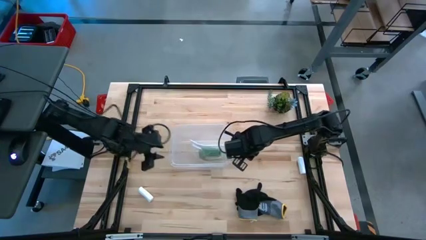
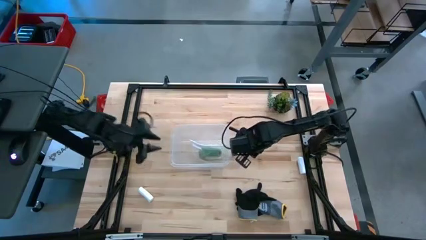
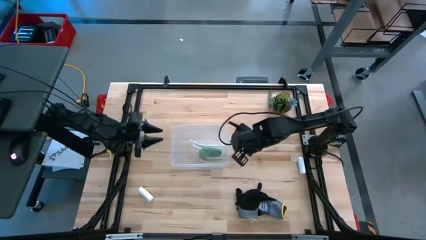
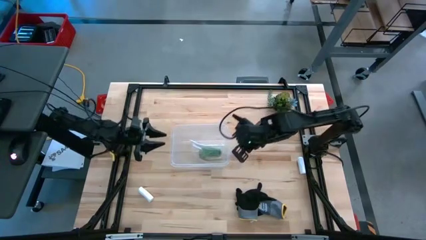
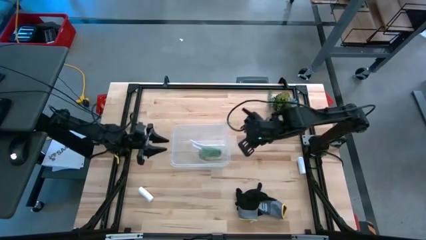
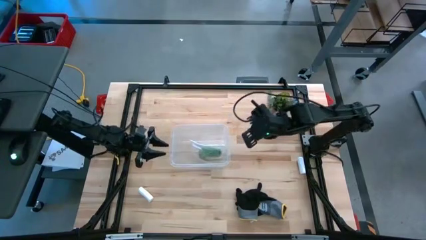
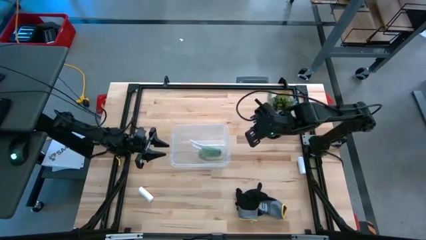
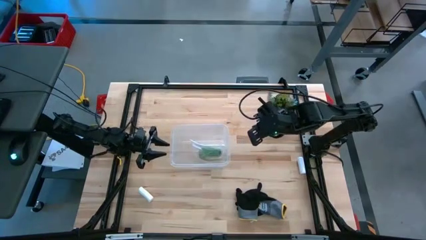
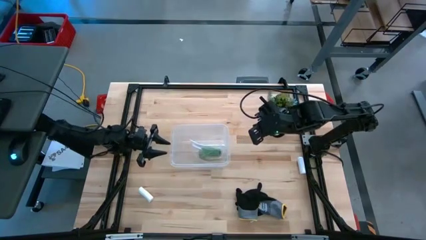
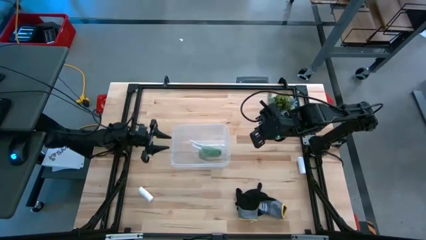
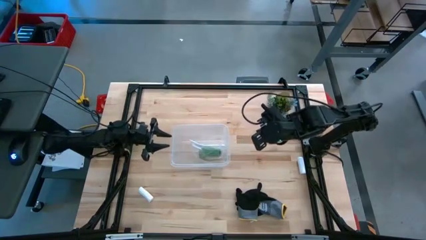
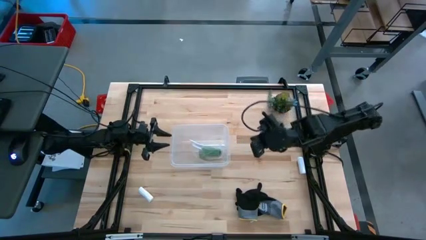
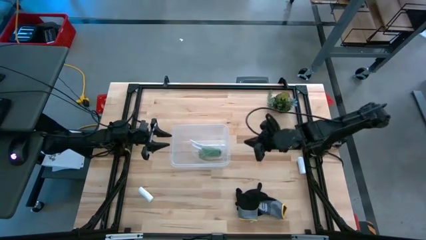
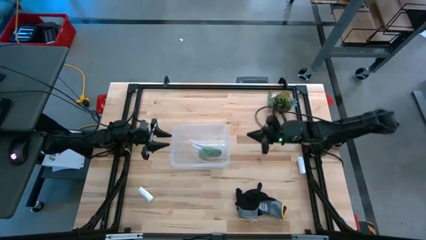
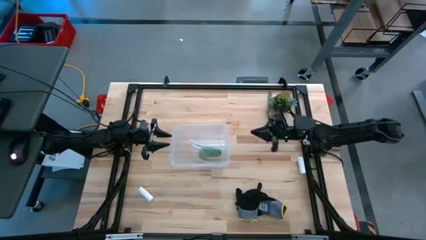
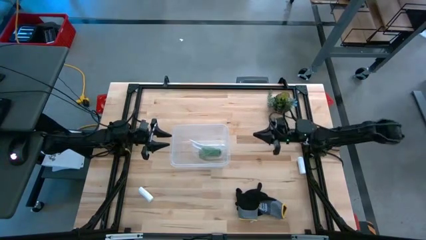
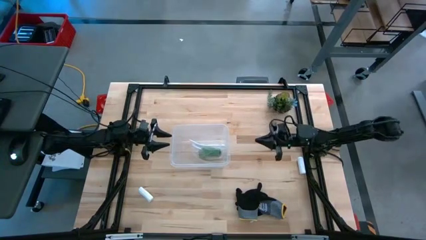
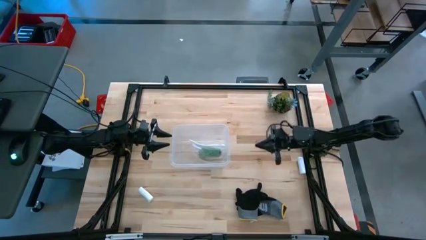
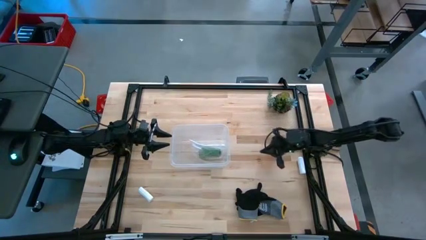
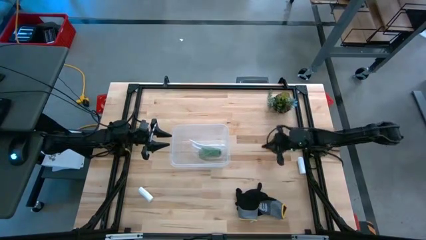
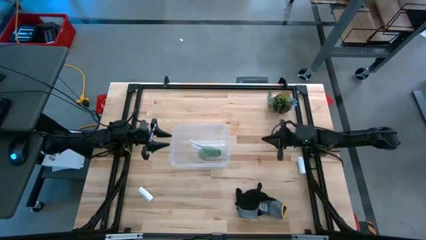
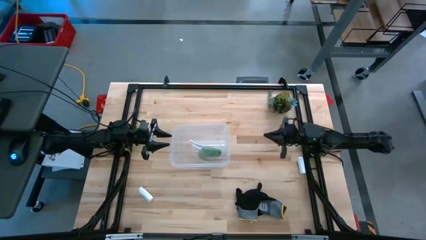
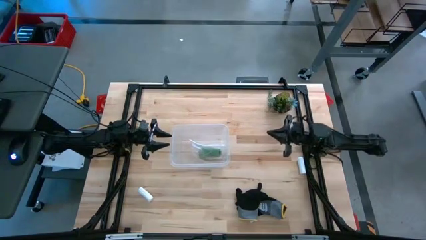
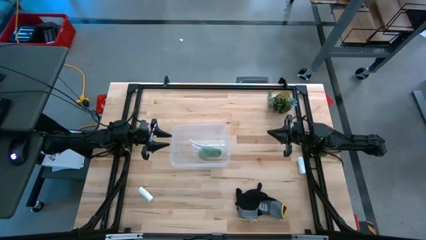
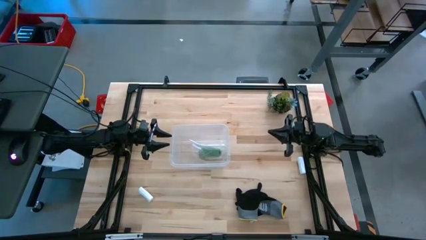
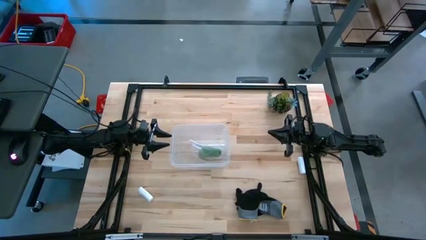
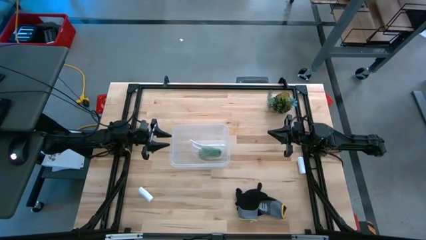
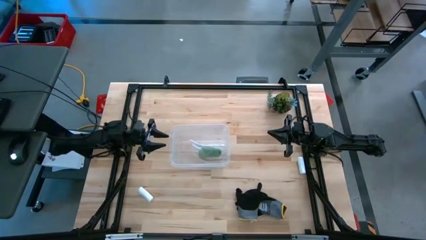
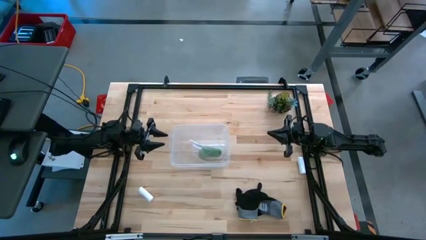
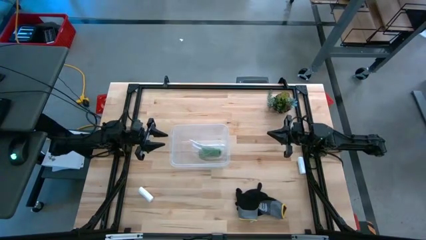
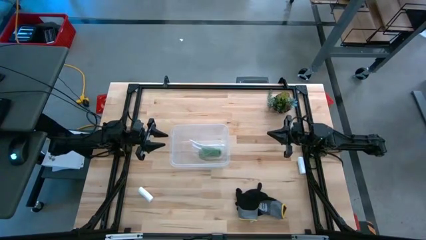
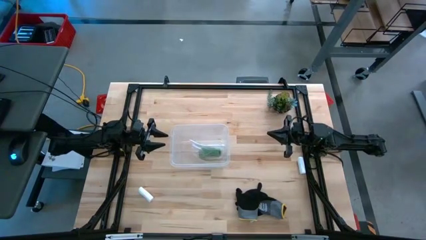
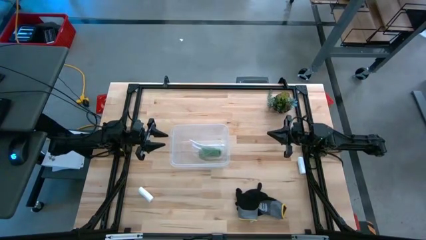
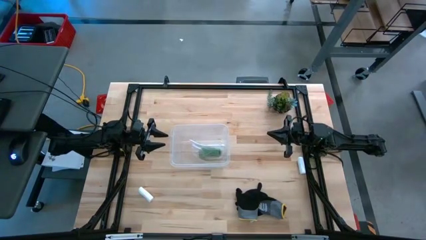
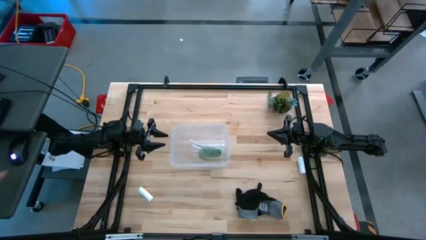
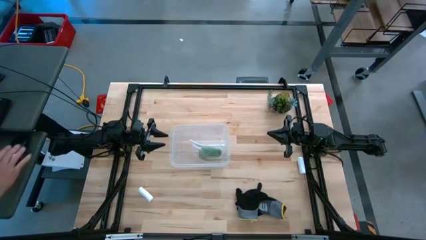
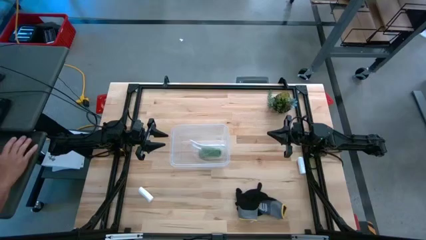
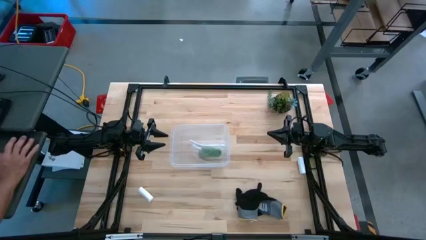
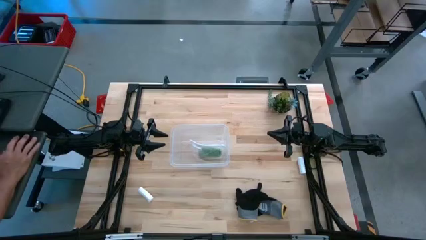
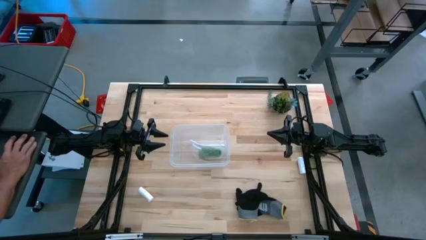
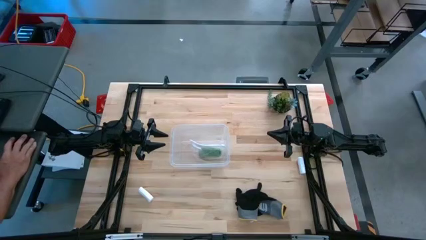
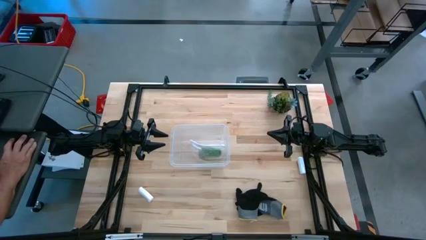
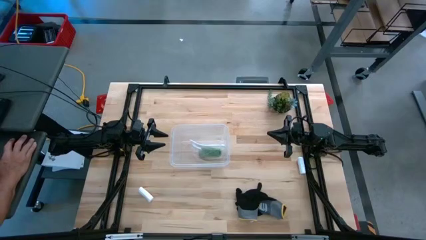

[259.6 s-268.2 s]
Task: Roll bandage
Return to Home Position

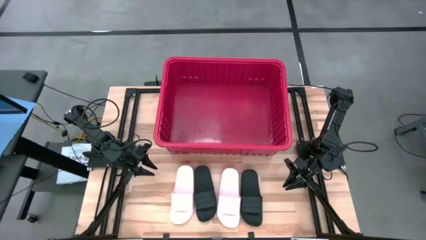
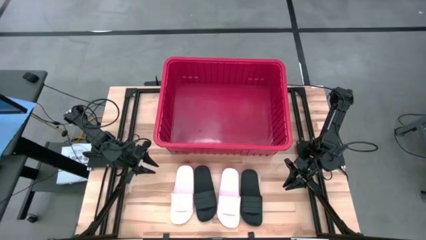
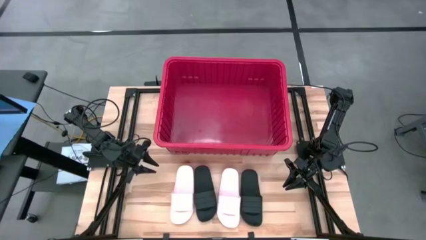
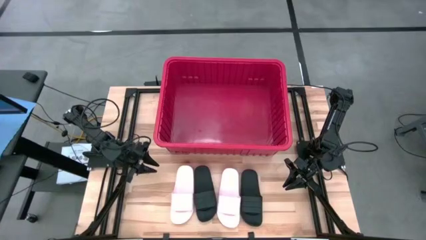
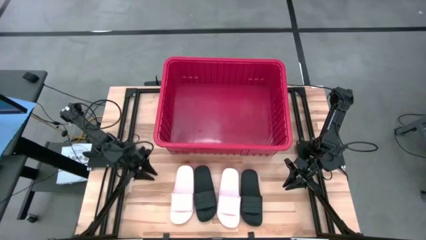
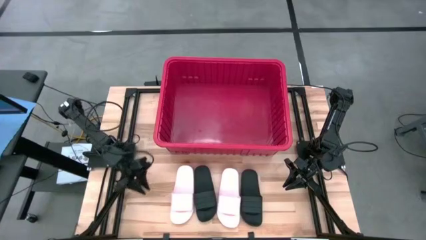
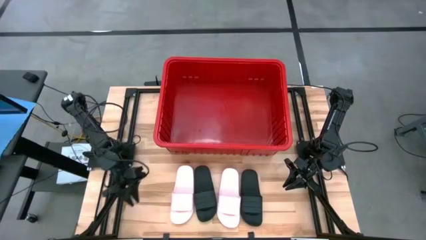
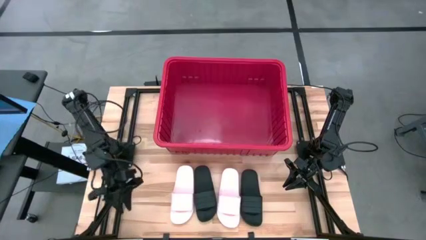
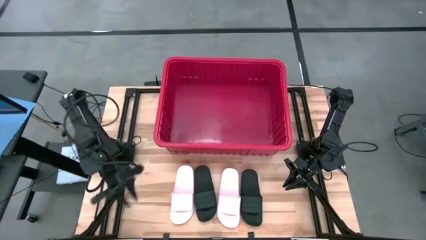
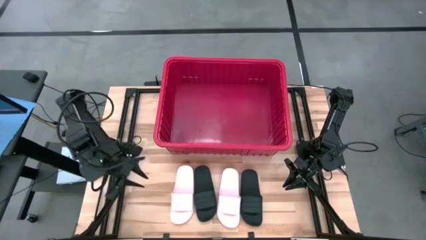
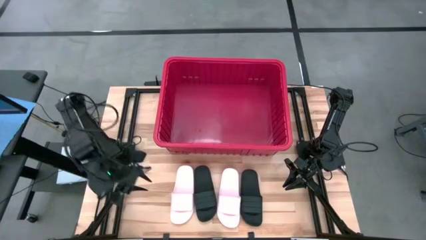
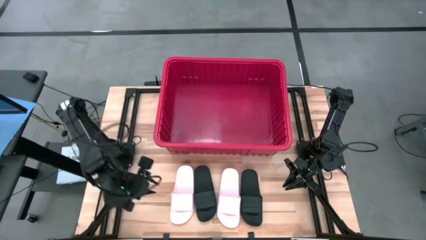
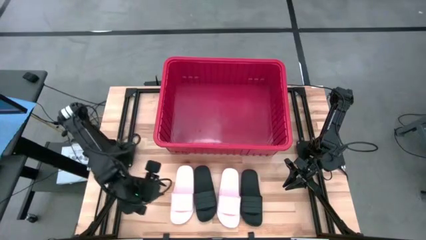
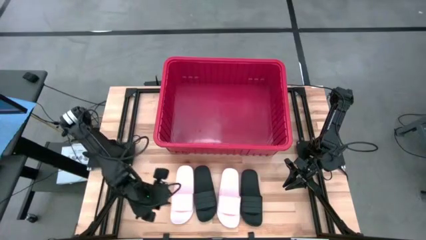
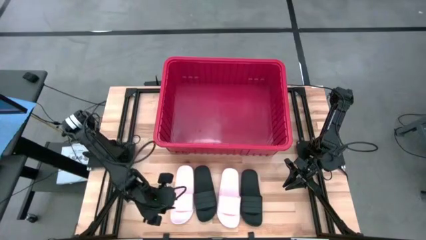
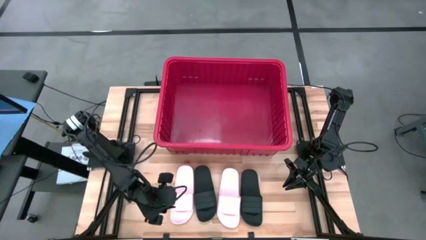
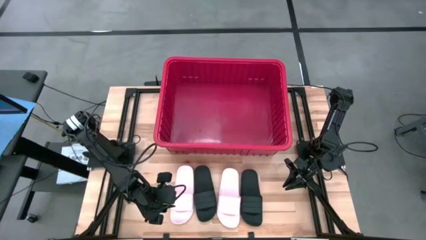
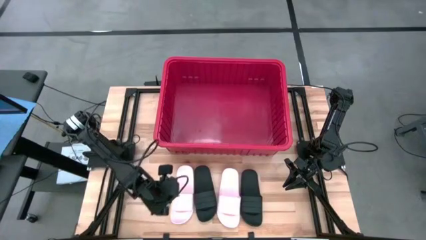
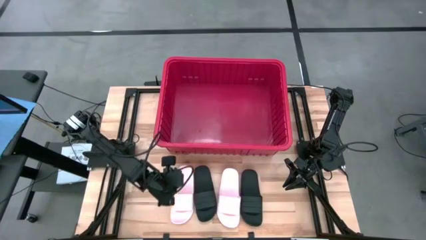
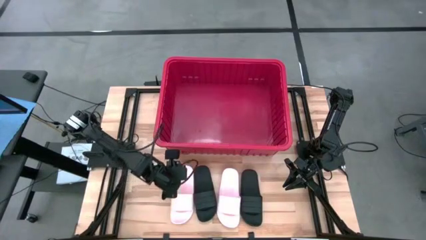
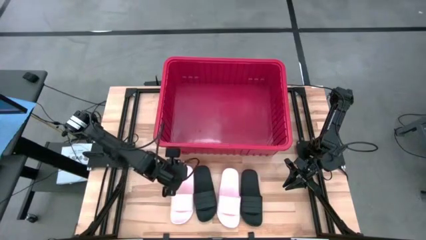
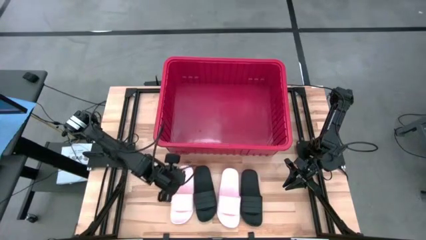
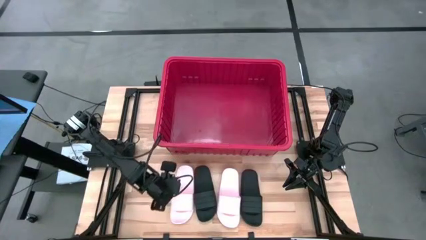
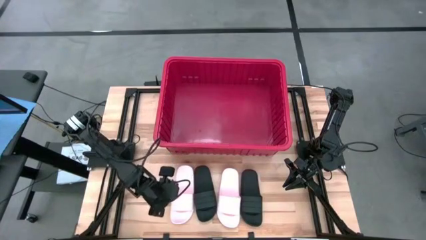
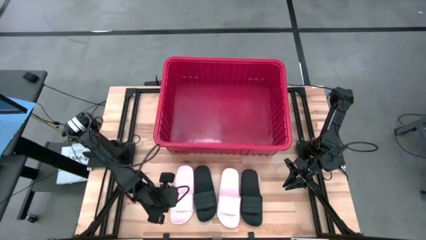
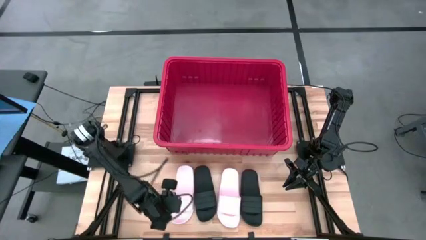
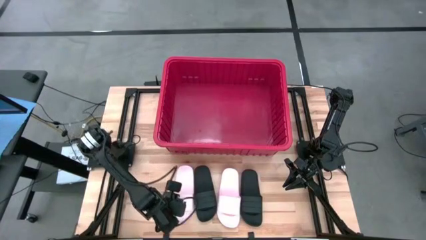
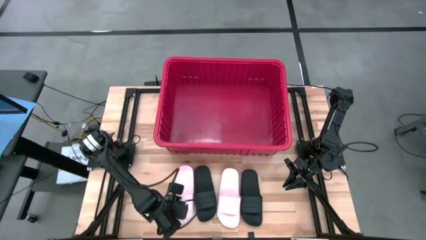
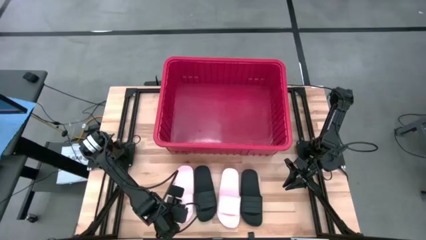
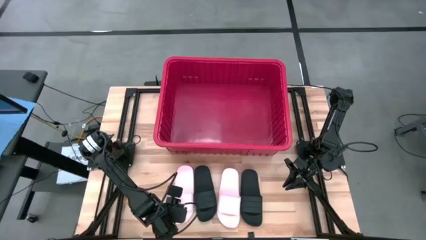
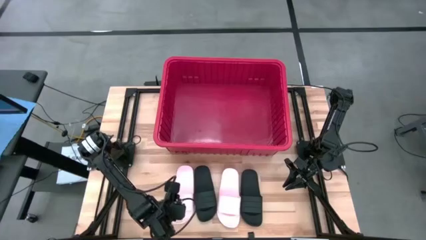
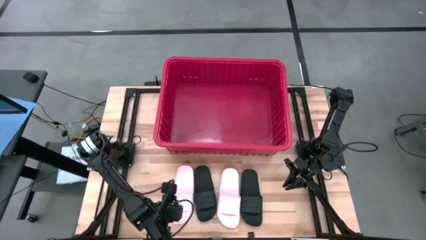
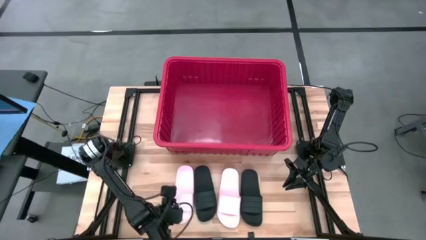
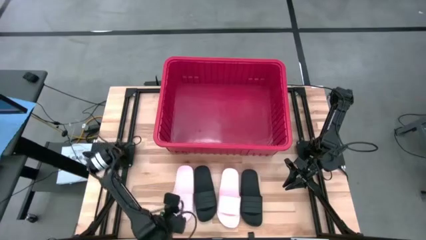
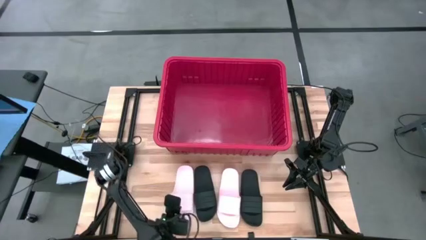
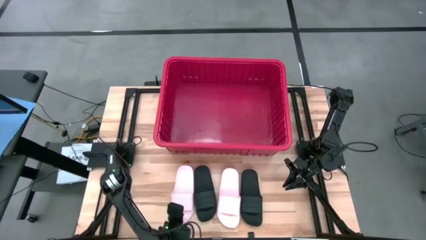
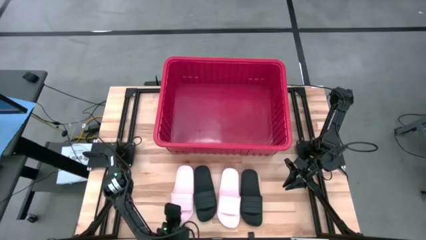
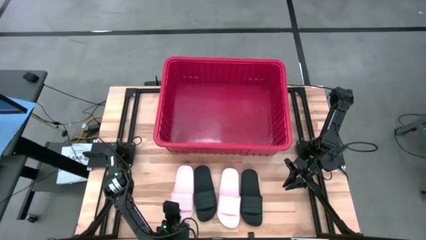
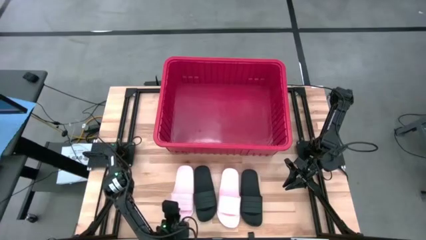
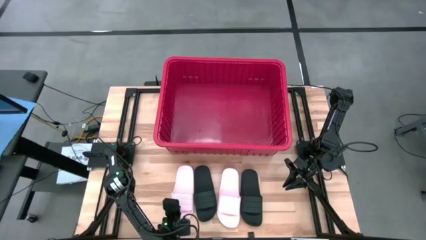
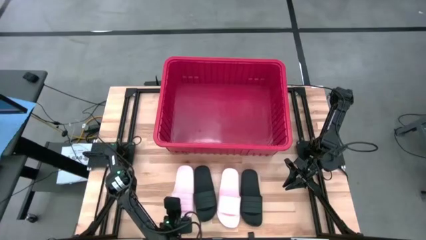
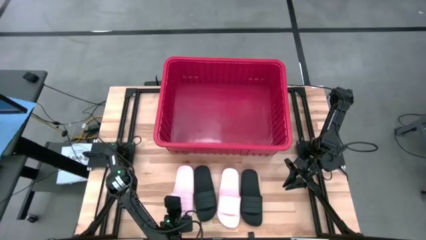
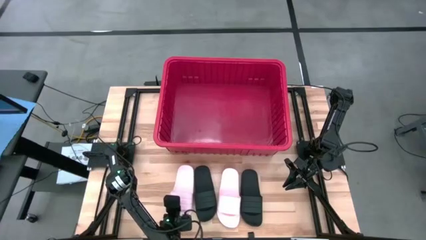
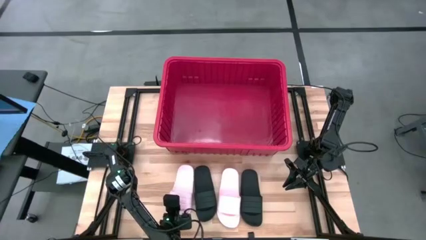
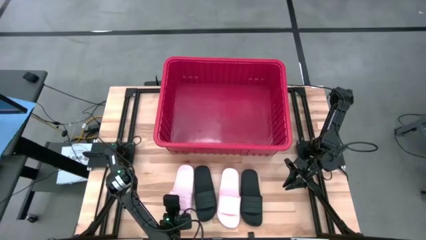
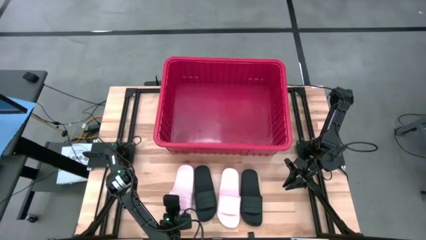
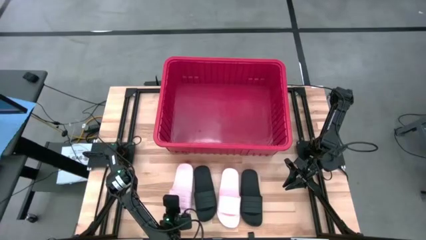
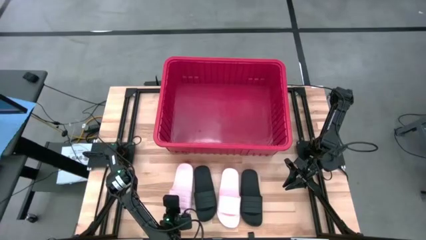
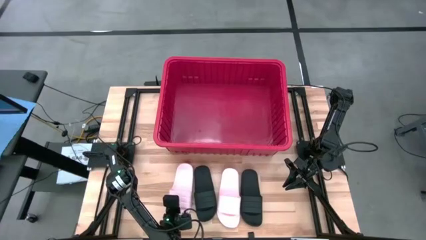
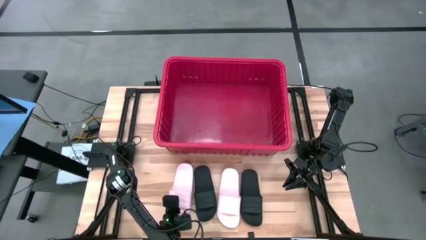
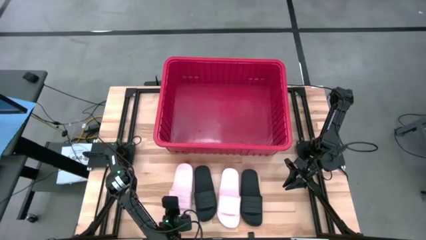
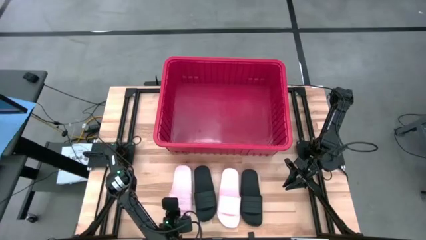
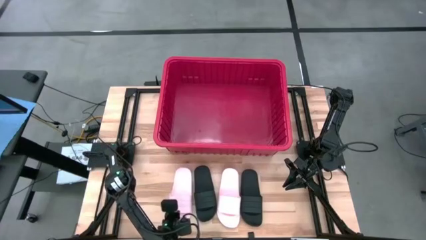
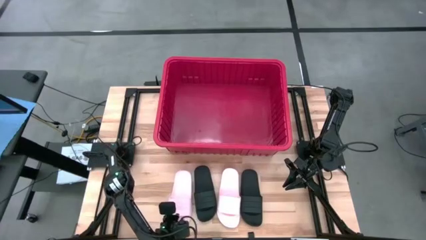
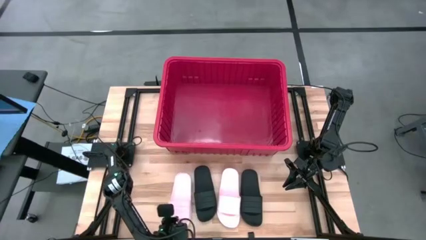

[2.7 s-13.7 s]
Task: Pick and place slides into bin
Put the left pink slide into the red container
